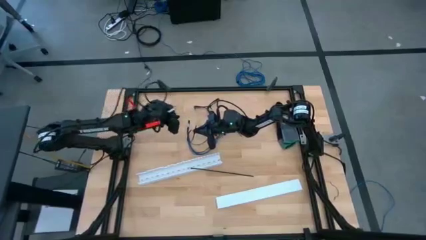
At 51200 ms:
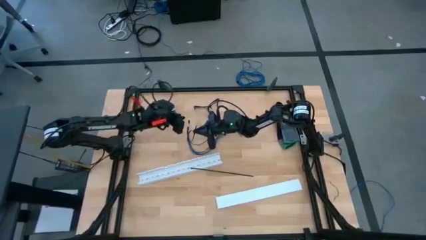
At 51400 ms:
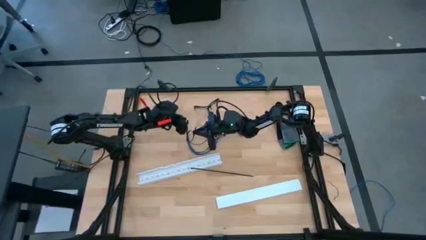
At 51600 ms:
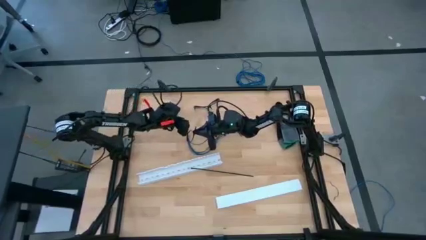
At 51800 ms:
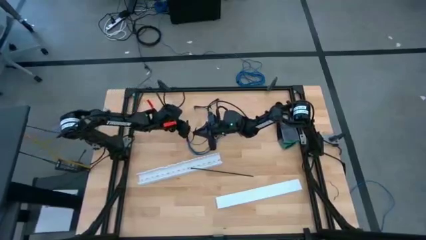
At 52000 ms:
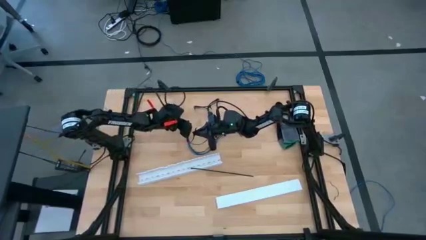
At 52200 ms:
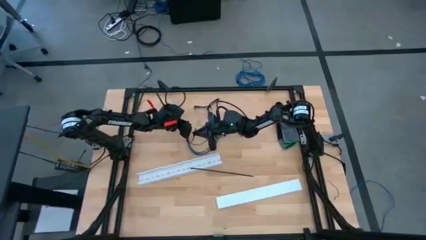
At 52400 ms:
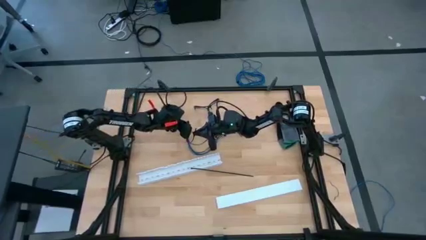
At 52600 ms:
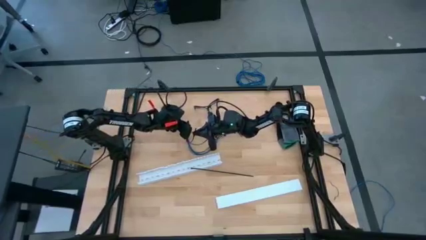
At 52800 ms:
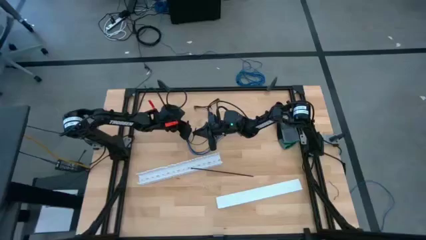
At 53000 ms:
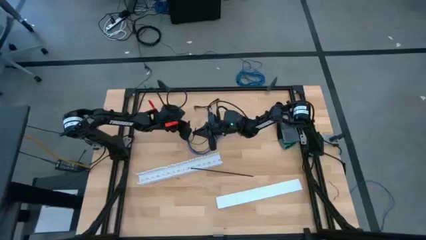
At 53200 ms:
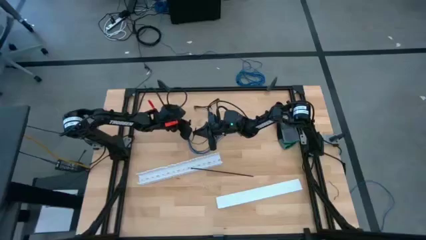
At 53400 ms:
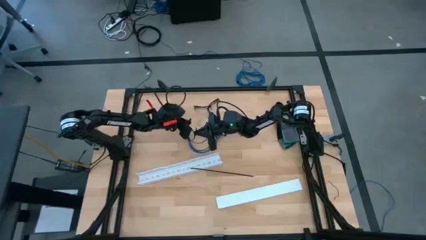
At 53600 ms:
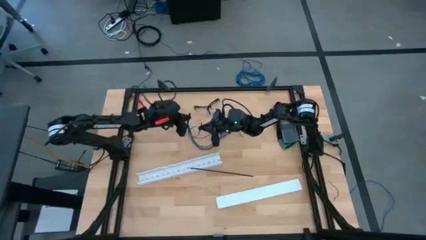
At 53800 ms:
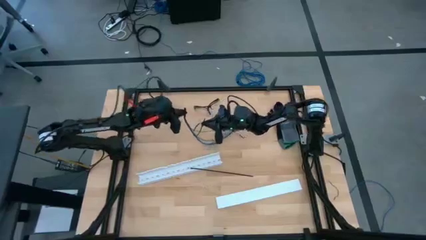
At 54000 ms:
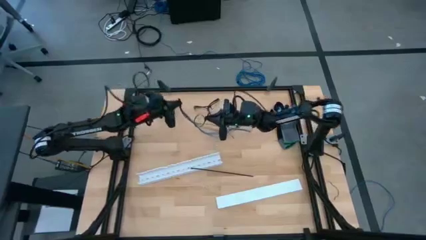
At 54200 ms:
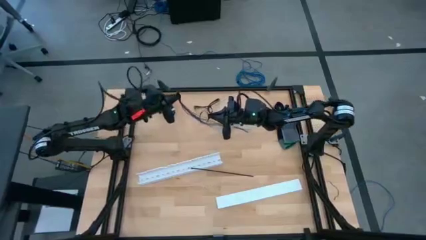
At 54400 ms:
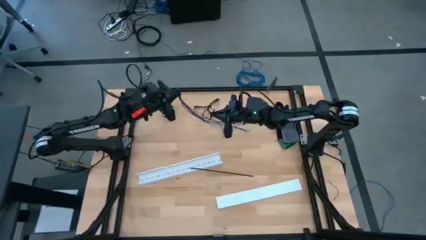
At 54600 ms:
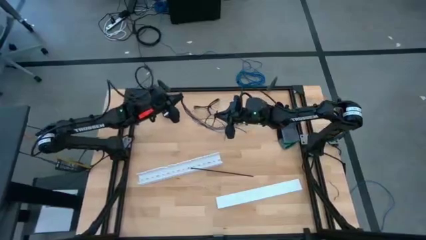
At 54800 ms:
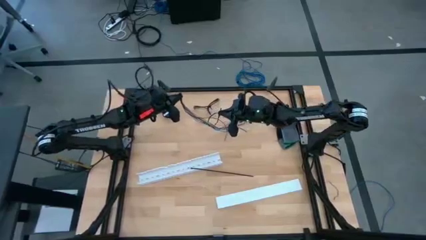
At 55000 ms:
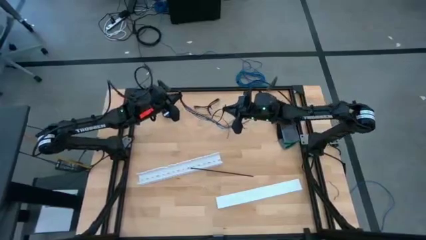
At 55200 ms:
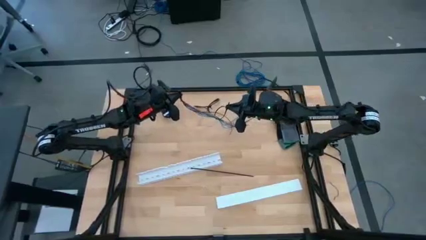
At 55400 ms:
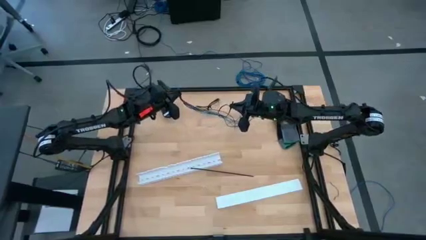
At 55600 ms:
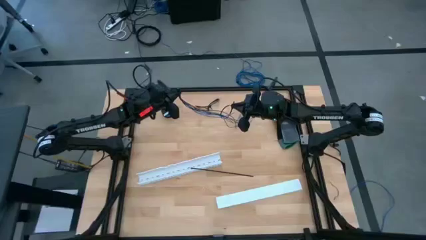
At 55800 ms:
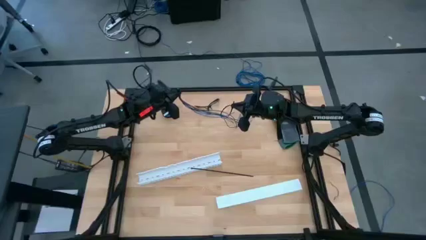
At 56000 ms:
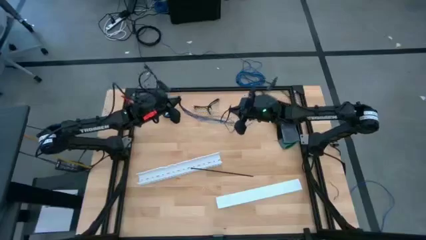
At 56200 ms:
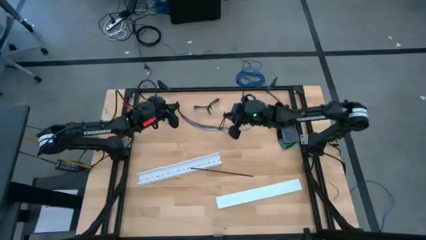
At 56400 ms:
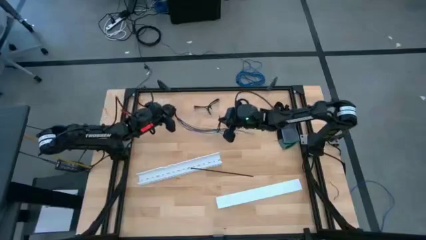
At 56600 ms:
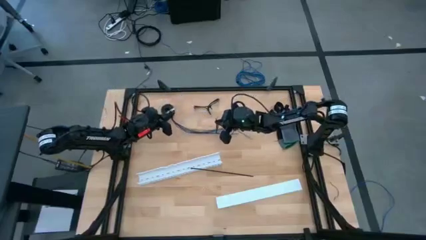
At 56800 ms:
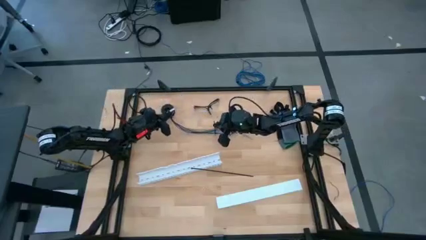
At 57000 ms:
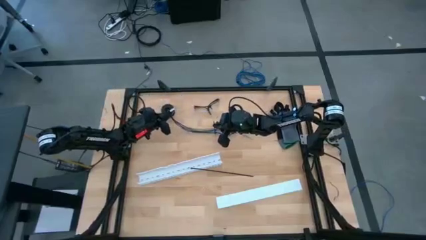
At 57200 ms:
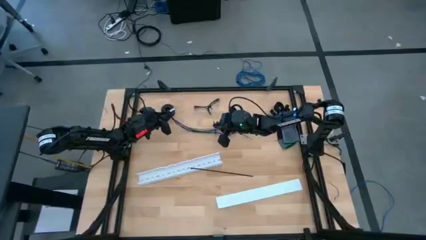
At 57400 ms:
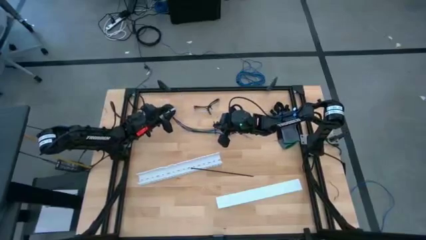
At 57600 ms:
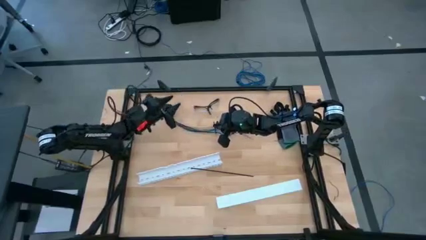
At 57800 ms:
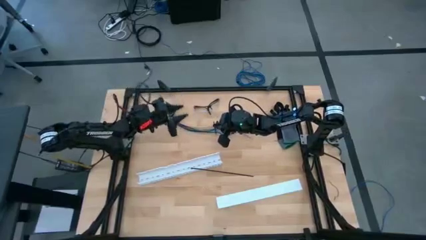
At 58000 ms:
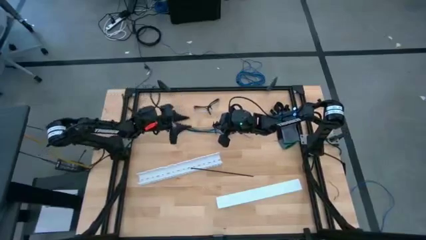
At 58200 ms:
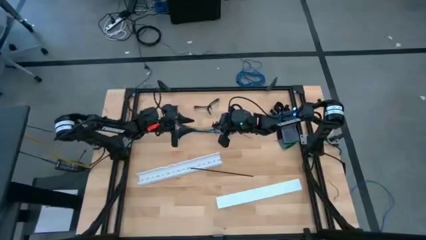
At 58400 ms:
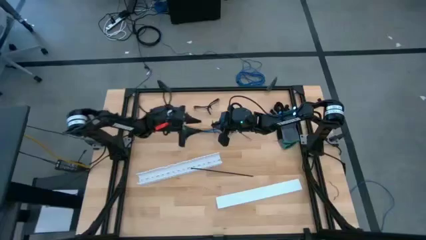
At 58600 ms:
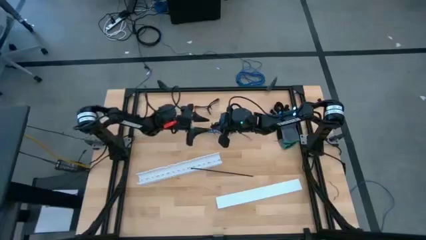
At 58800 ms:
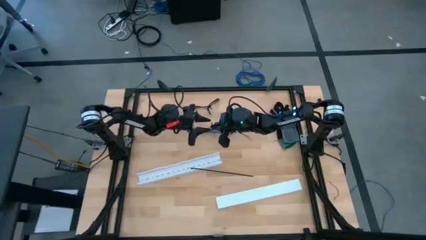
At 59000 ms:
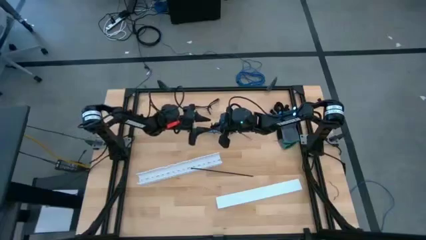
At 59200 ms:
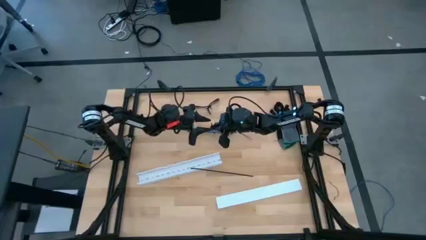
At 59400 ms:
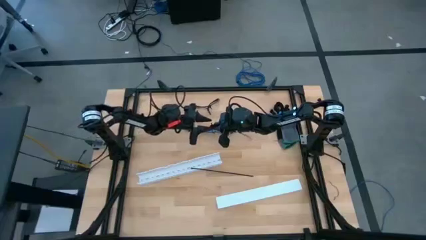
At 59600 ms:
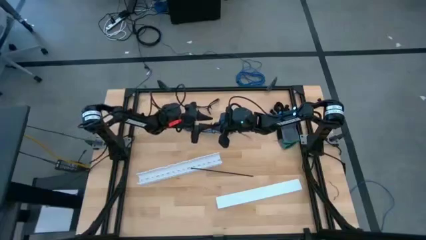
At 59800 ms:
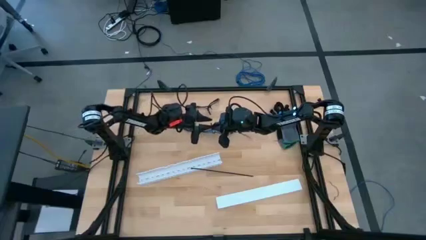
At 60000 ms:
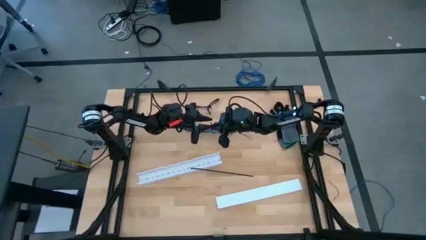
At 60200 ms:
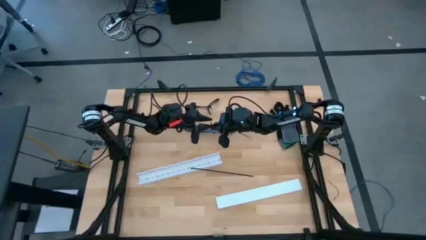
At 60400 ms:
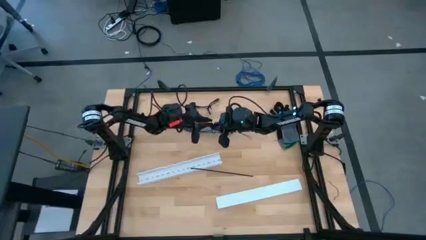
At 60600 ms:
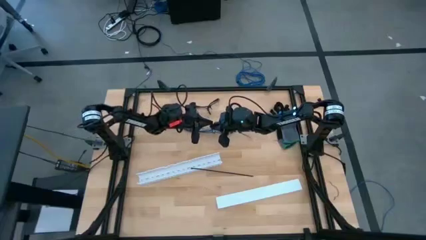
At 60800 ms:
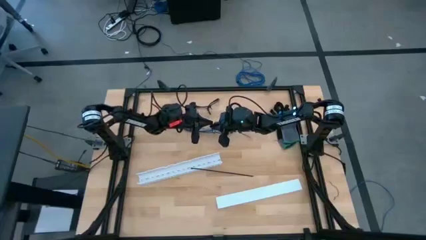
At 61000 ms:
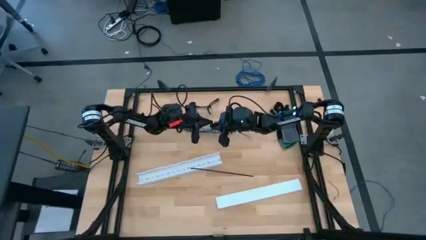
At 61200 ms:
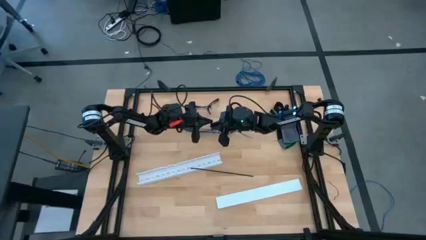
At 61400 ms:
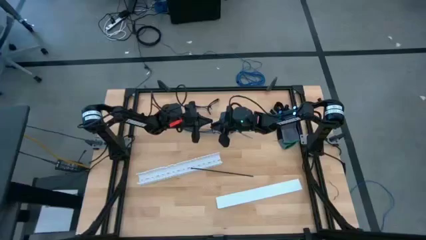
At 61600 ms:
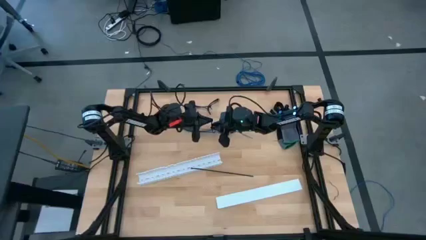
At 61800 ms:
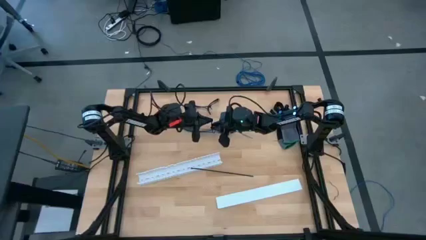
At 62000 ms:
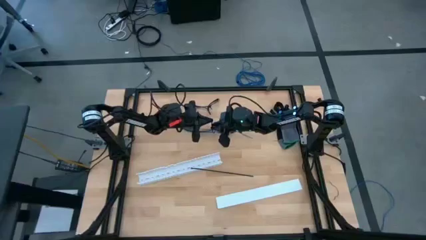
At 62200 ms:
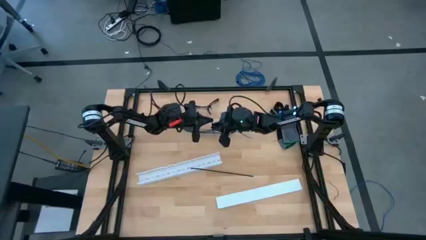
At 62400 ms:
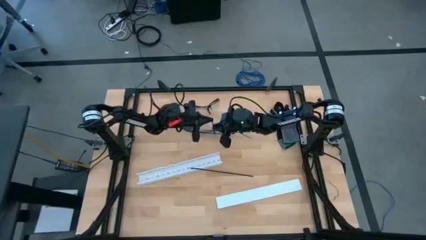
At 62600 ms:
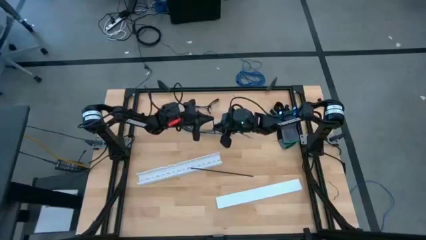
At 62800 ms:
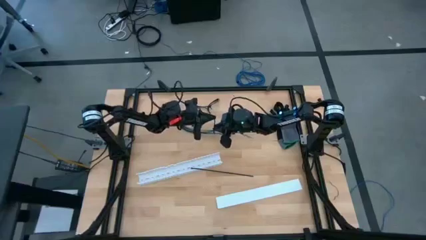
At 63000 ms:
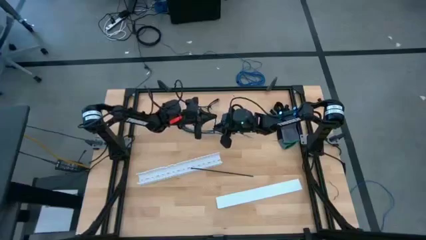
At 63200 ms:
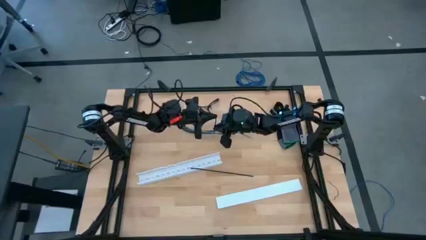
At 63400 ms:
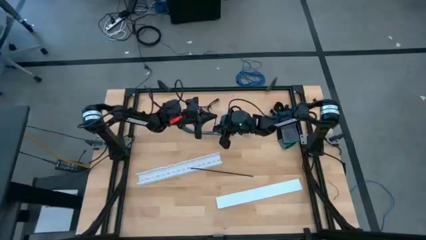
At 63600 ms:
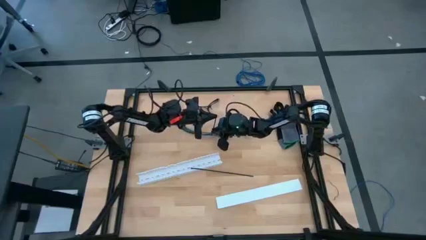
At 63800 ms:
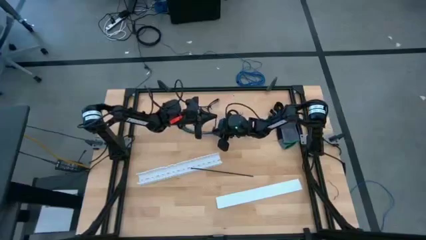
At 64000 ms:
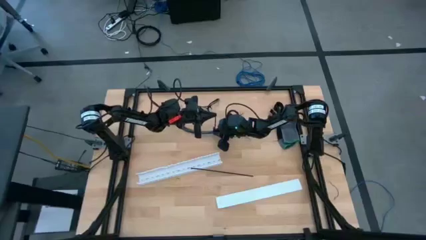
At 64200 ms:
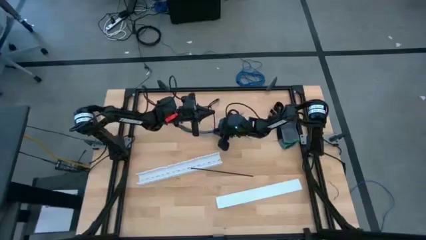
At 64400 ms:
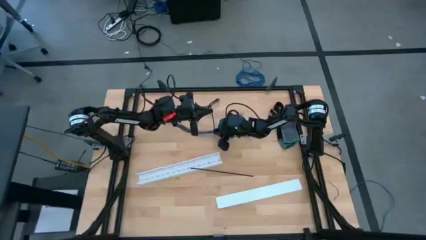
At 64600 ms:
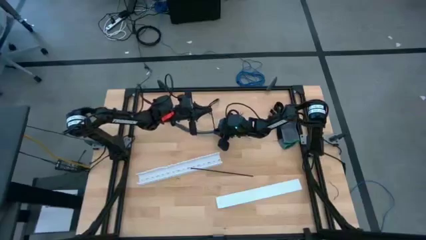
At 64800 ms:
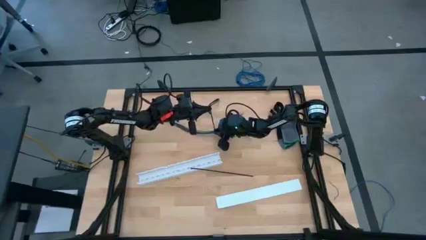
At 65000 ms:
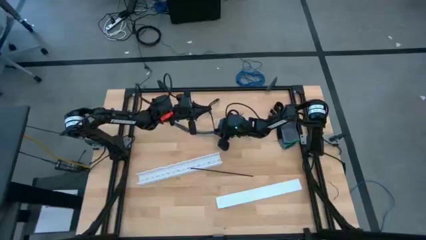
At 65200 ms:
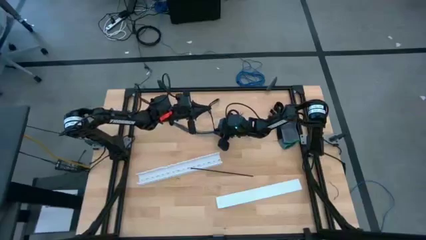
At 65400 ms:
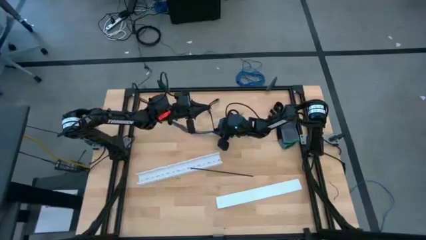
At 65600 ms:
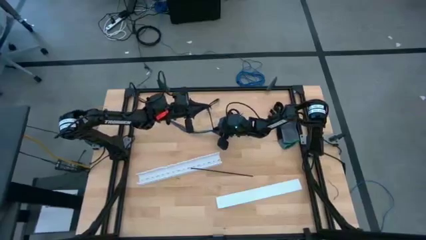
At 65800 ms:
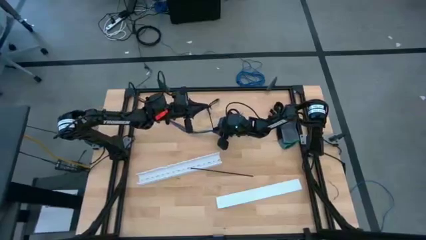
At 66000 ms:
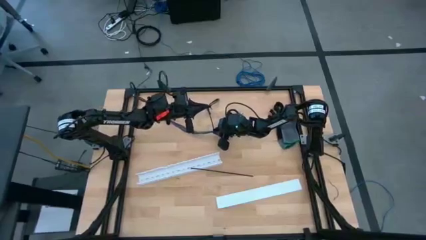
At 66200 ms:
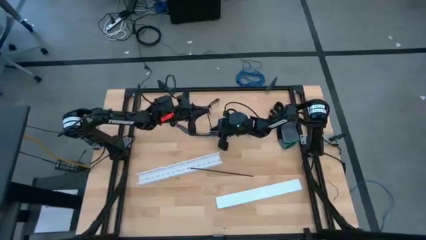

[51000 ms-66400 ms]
Task: Ziptie cables
Wrap the cable wires with the black zip tie
